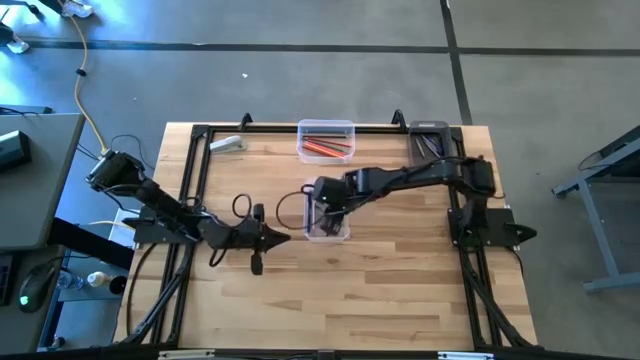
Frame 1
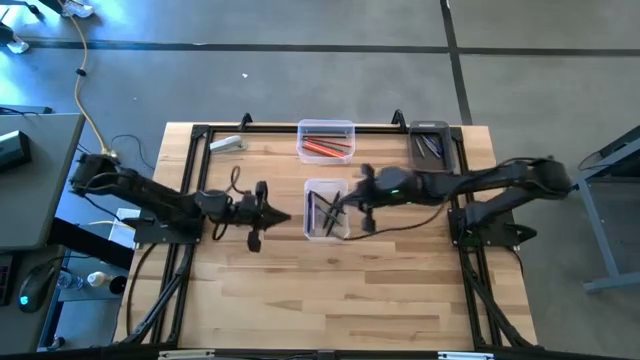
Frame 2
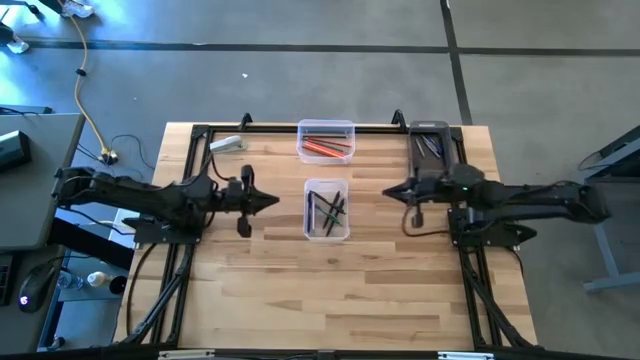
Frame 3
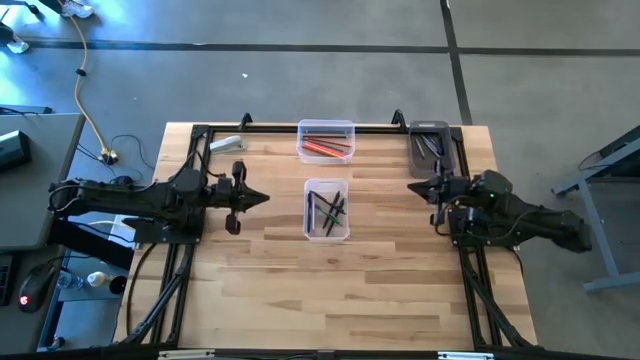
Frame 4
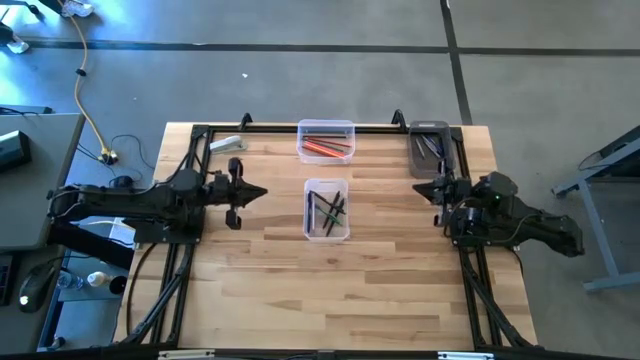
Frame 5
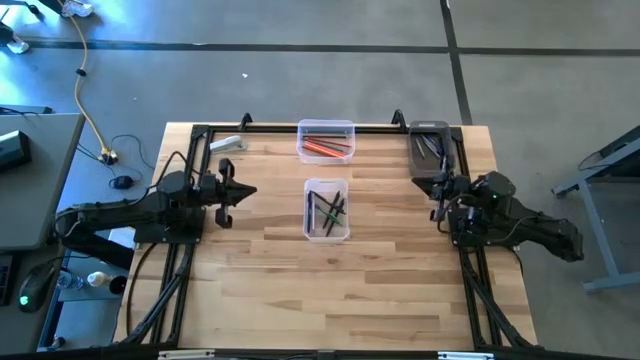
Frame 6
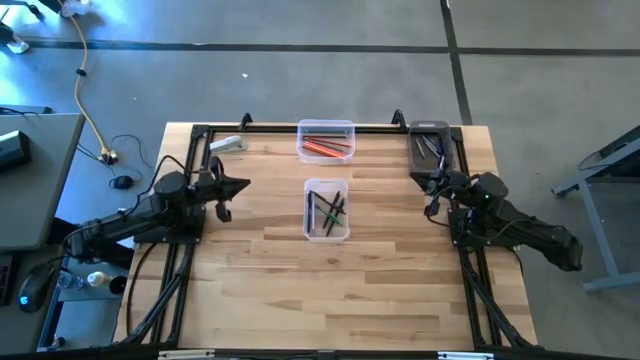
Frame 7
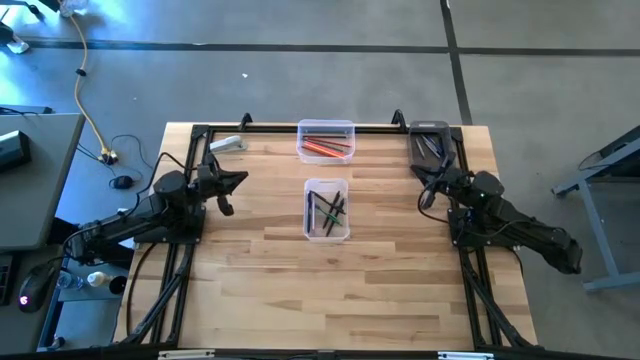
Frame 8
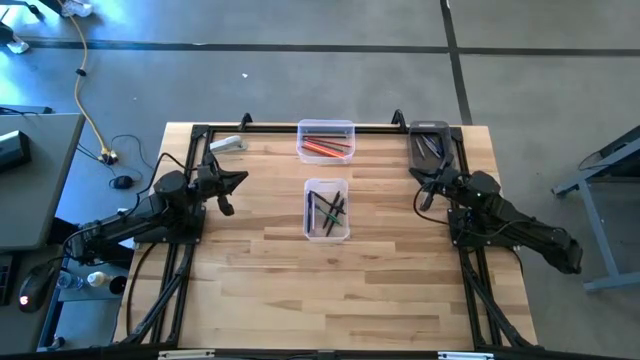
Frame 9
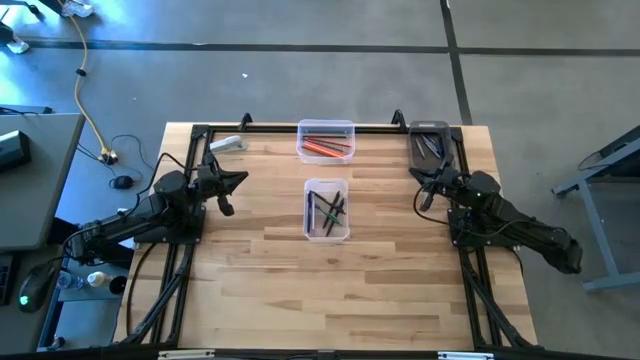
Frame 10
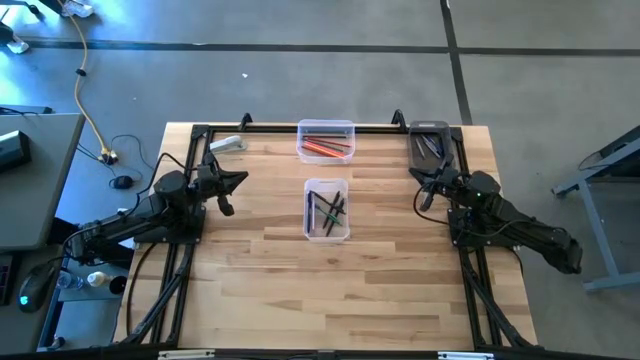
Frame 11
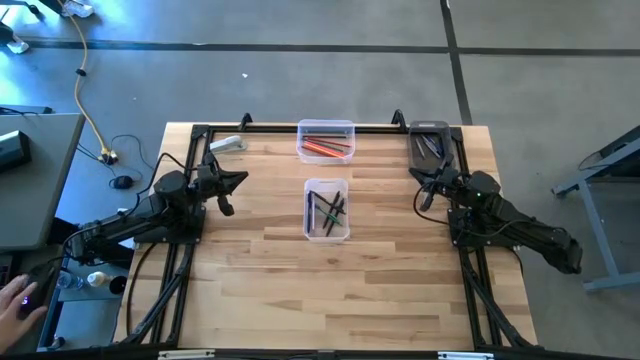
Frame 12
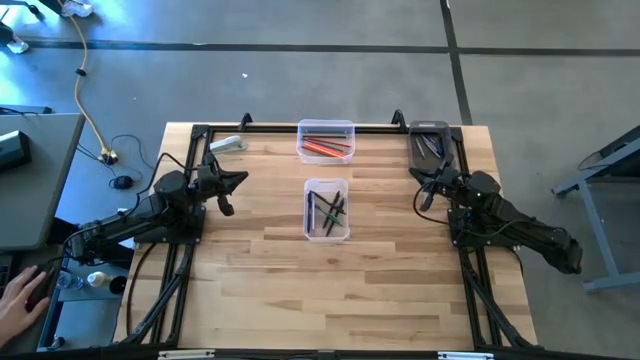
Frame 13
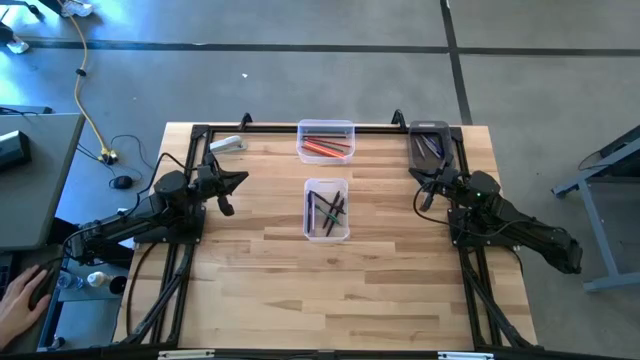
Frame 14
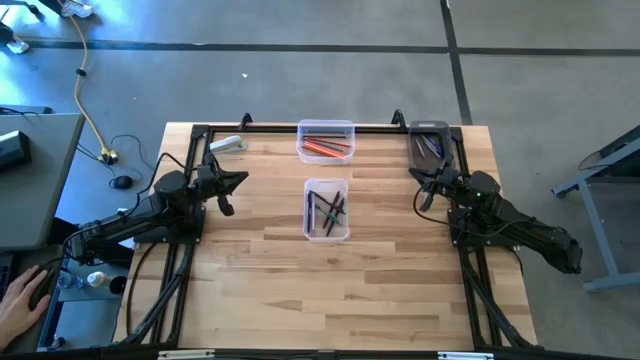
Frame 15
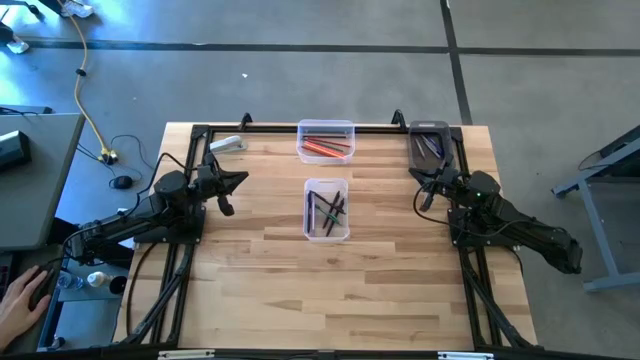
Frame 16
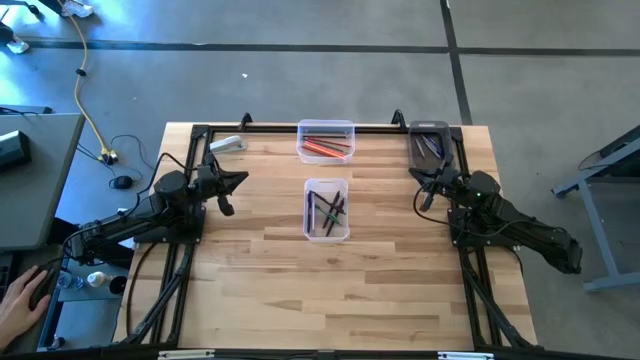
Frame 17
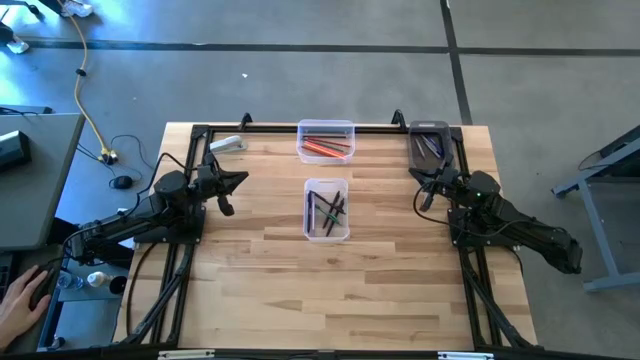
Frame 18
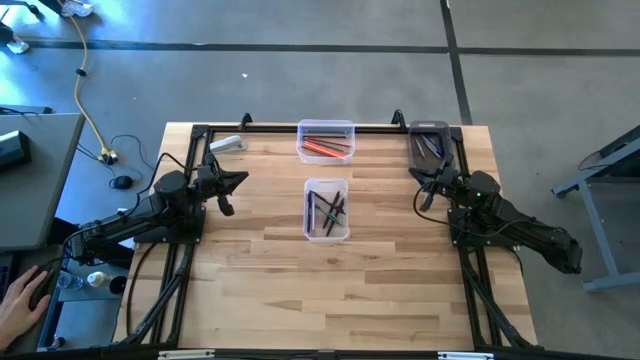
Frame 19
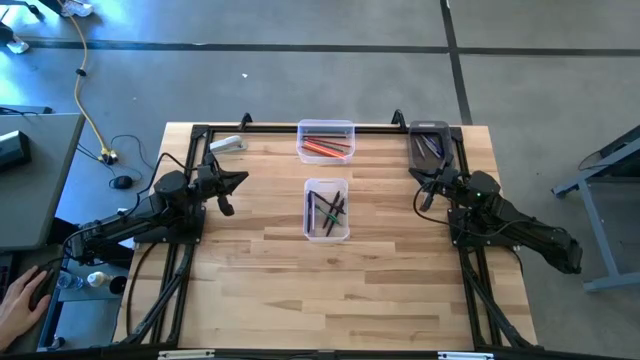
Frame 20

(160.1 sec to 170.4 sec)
Task: Sort crayons/erasers/pens/pencils in bins
Return to home position

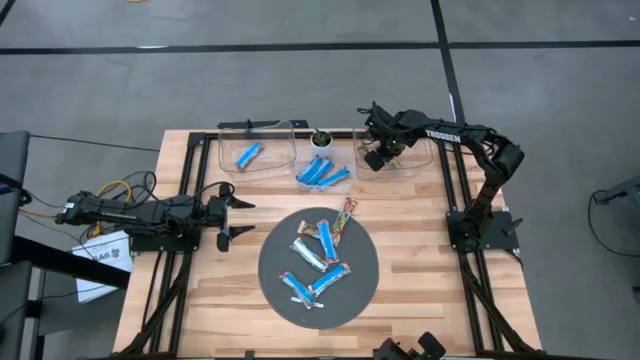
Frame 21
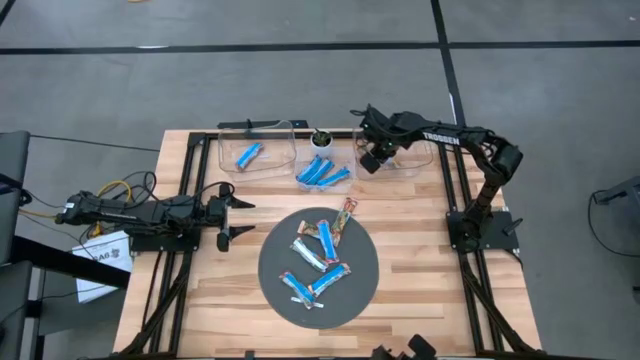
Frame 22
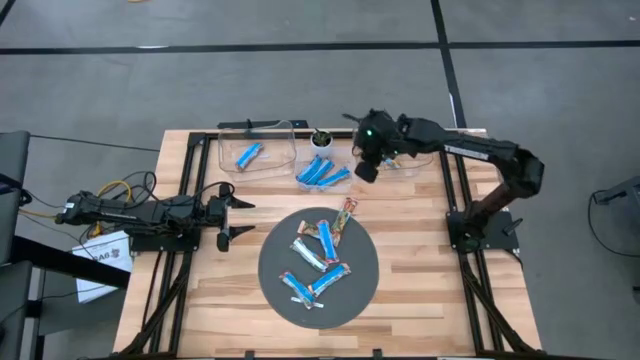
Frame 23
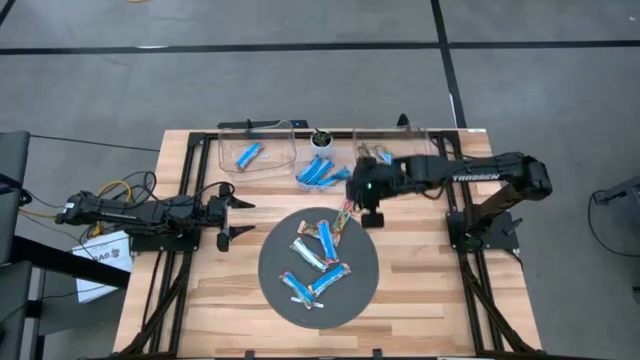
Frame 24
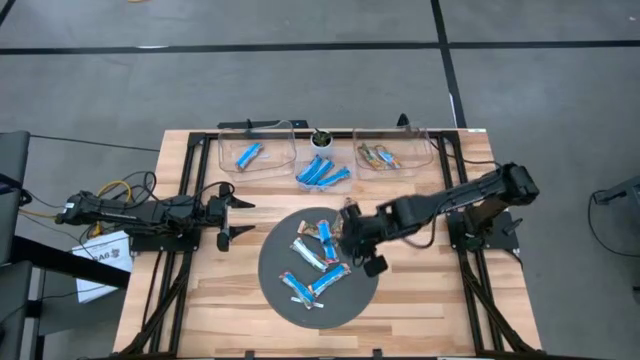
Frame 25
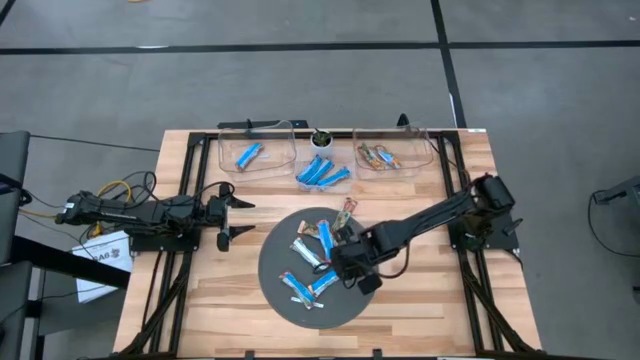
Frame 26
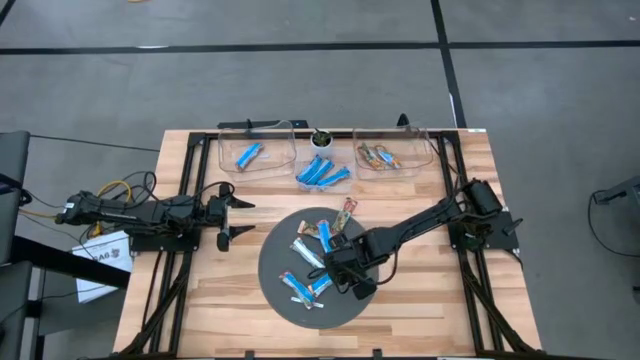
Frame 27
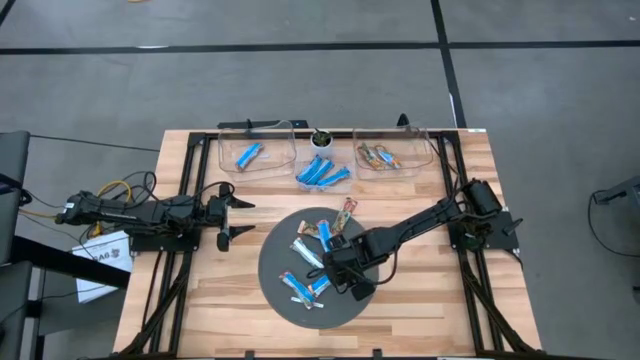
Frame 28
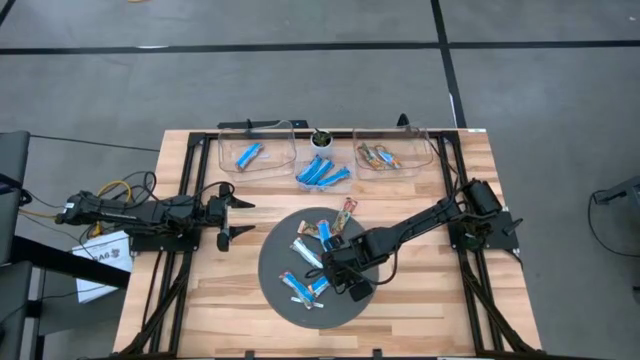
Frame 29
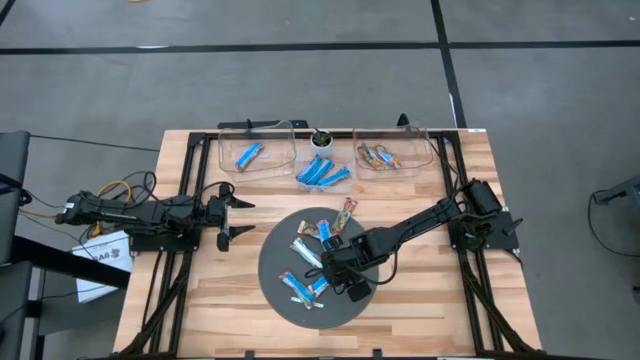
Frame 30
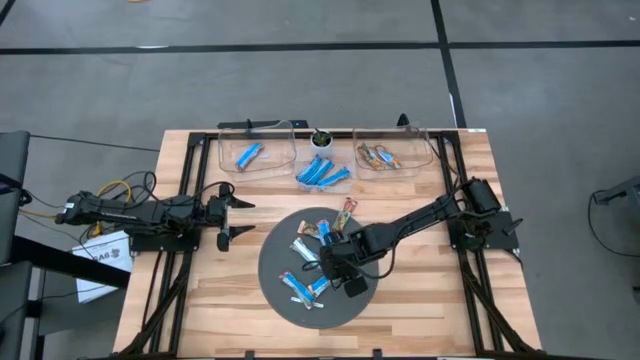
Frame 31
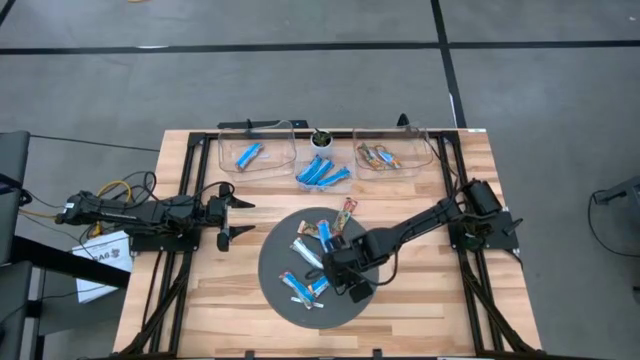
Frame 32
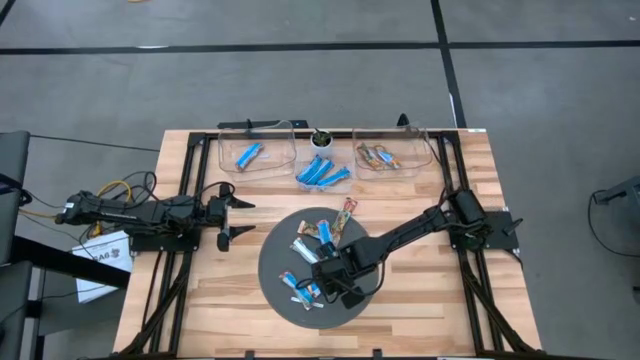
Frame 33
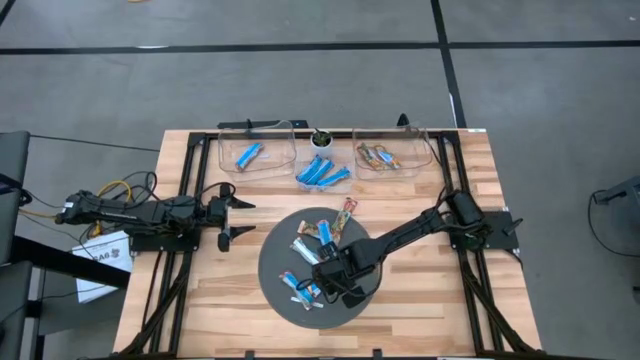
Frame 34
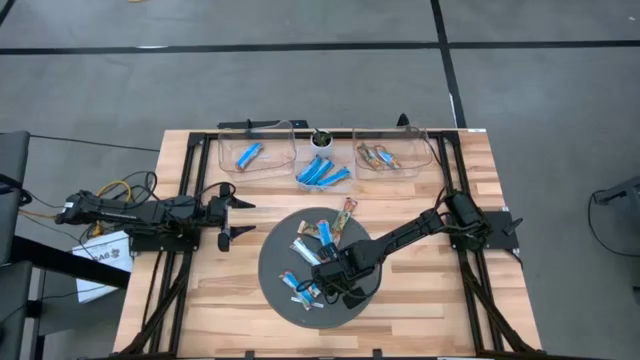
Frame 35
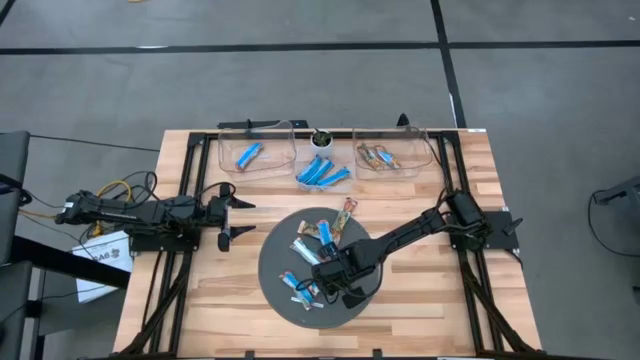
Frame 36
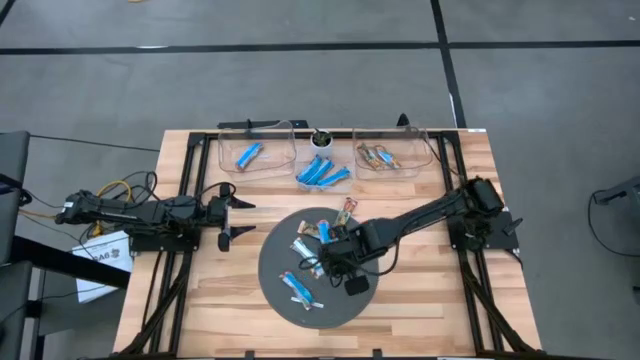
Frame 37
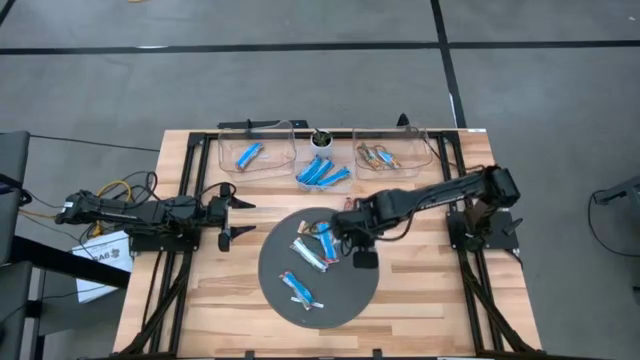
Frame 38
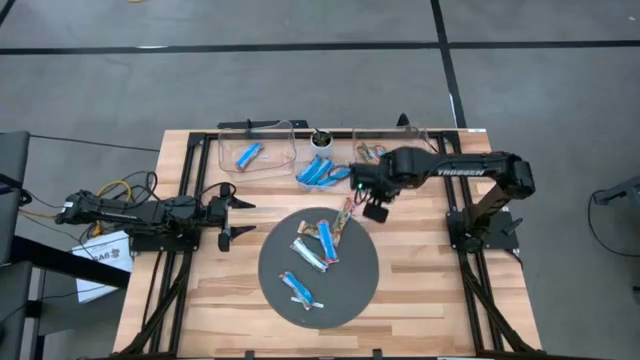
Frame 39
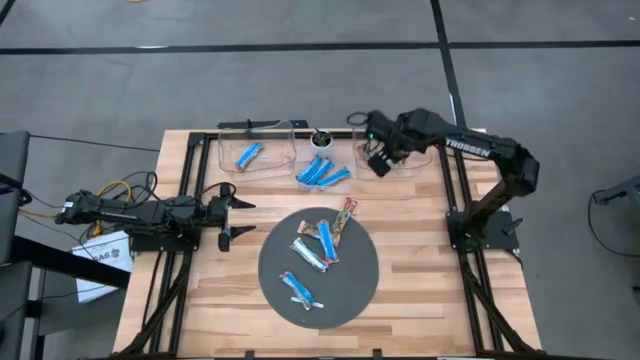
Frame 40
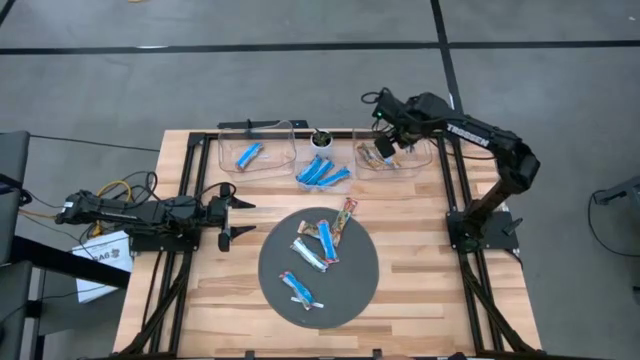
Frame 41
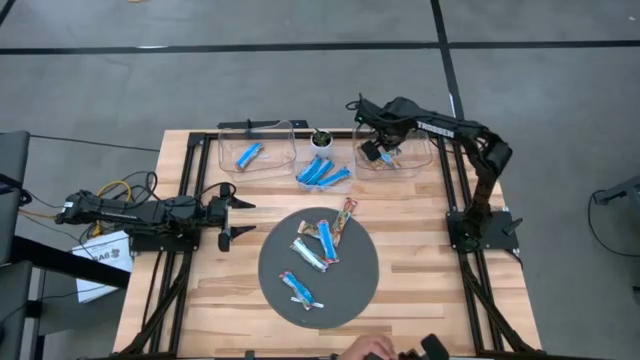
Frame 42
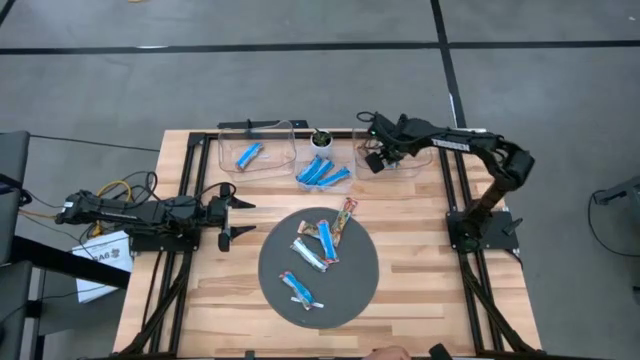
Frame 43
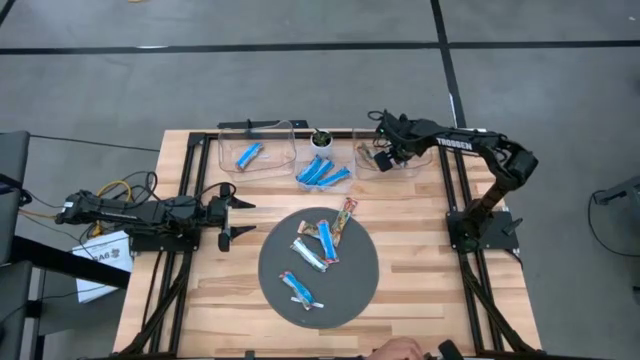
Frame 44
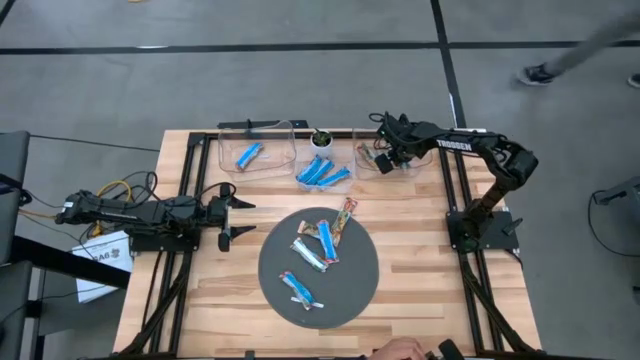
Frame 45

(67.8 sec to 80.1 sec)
Task: Pick and place Granola Bars by type
Put the yellow granola bar into the right transparent bin
